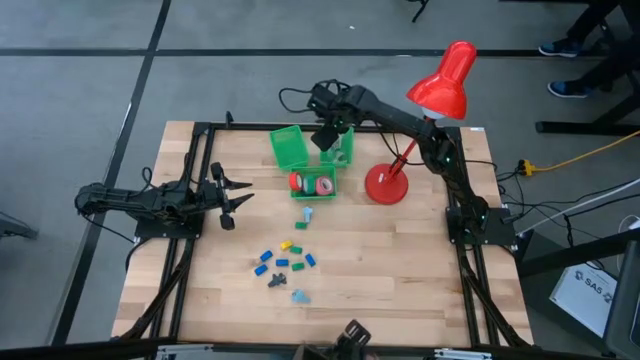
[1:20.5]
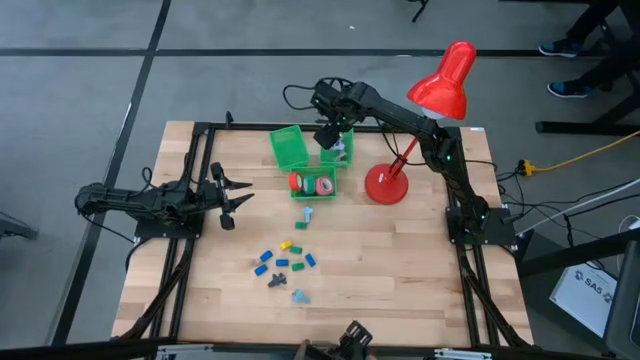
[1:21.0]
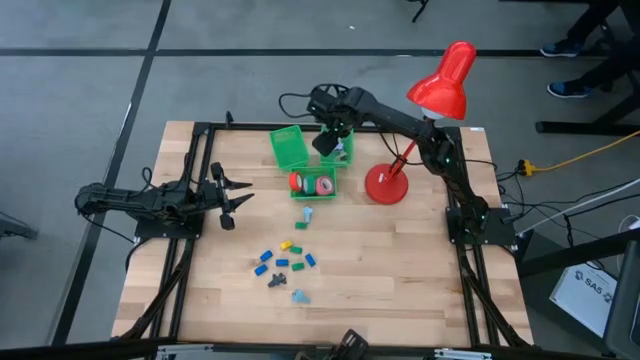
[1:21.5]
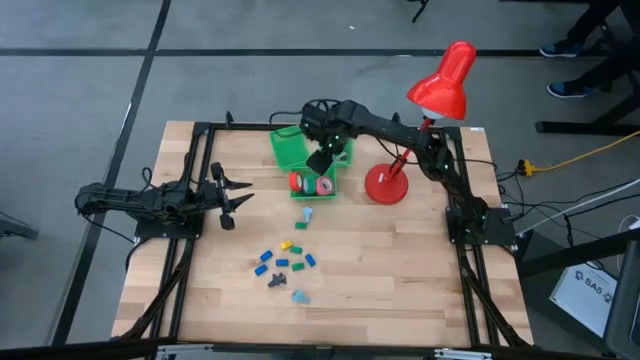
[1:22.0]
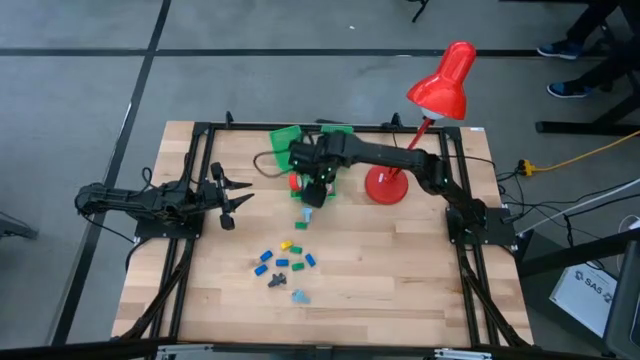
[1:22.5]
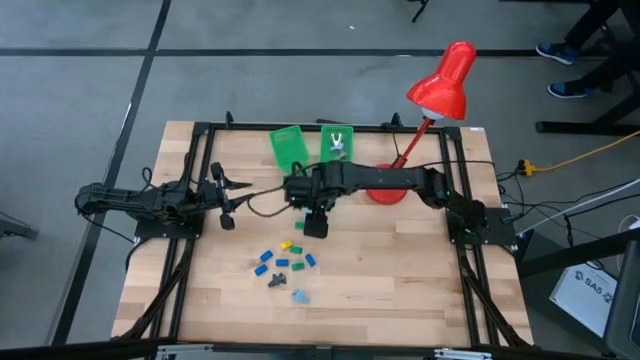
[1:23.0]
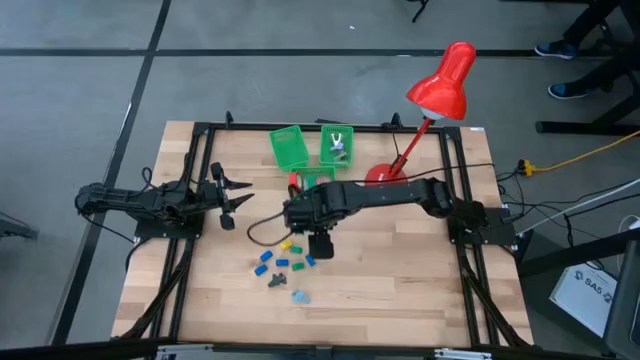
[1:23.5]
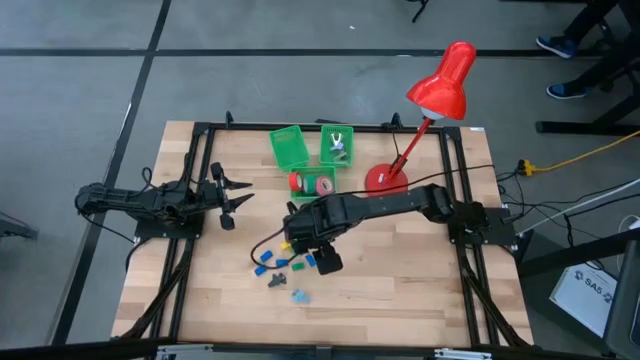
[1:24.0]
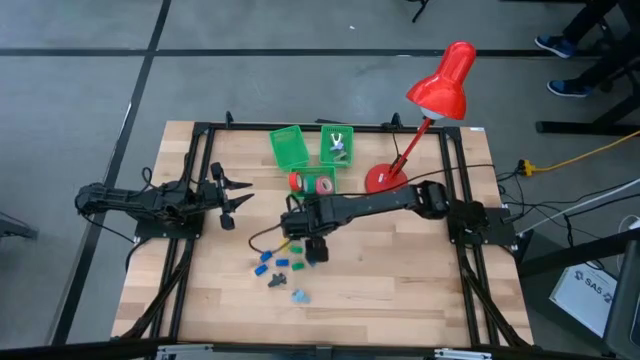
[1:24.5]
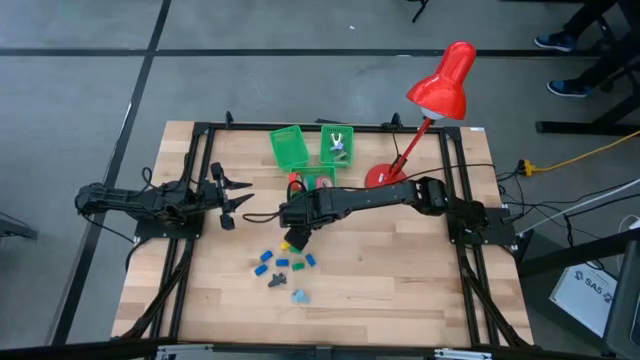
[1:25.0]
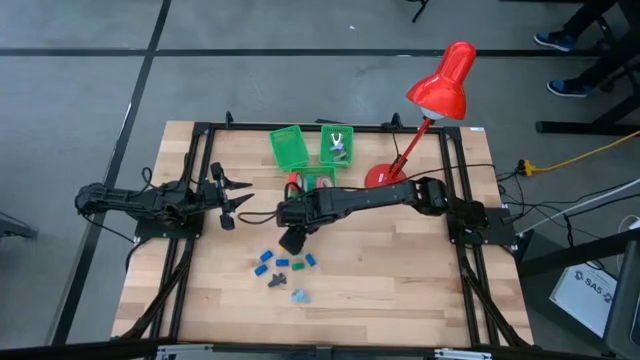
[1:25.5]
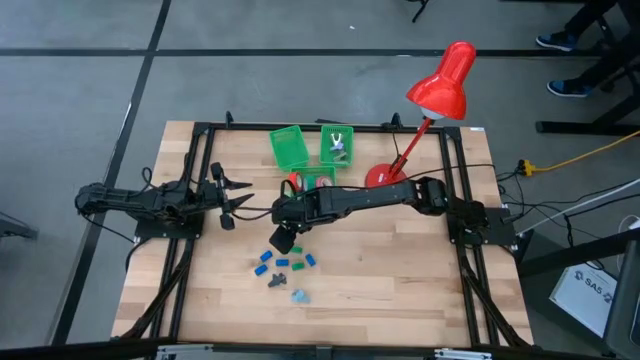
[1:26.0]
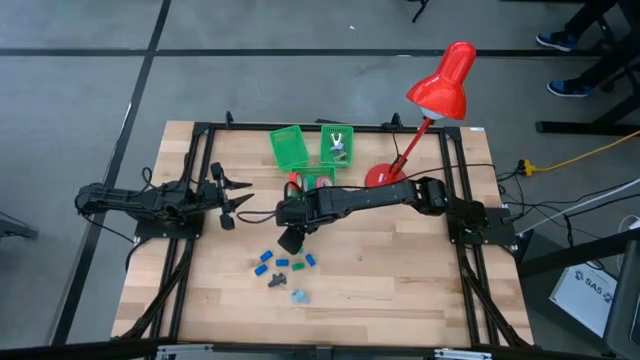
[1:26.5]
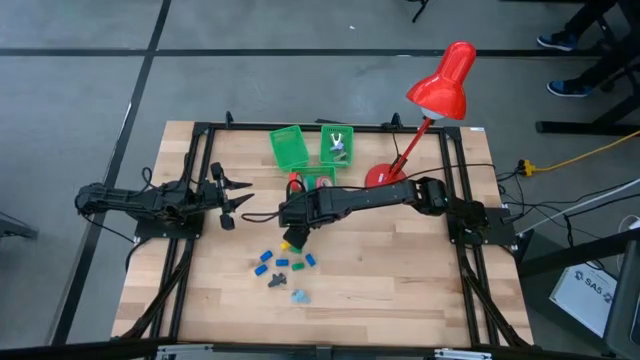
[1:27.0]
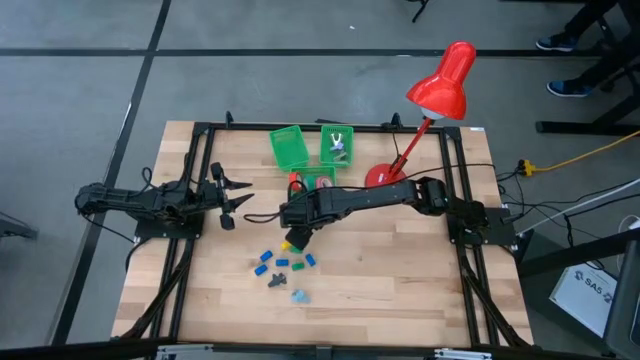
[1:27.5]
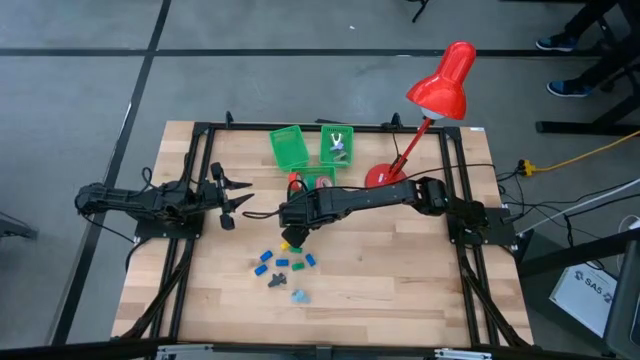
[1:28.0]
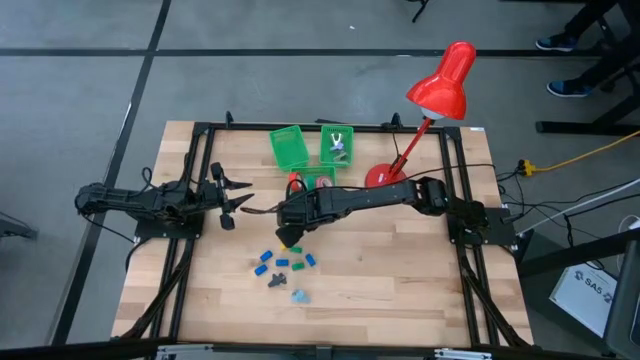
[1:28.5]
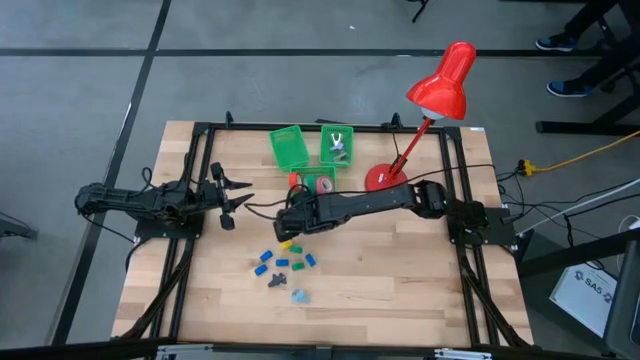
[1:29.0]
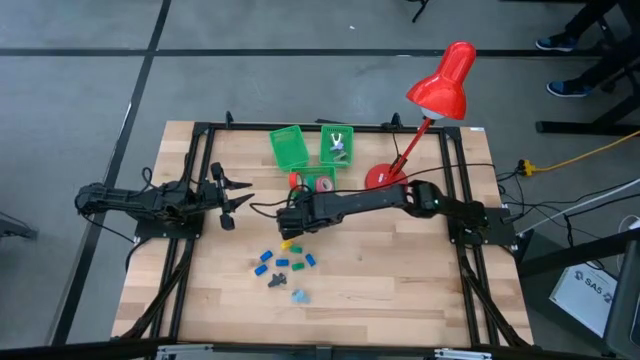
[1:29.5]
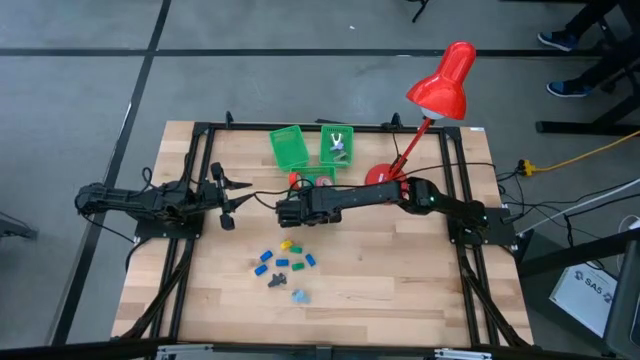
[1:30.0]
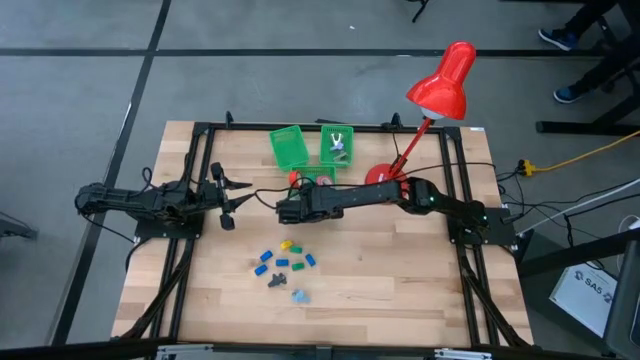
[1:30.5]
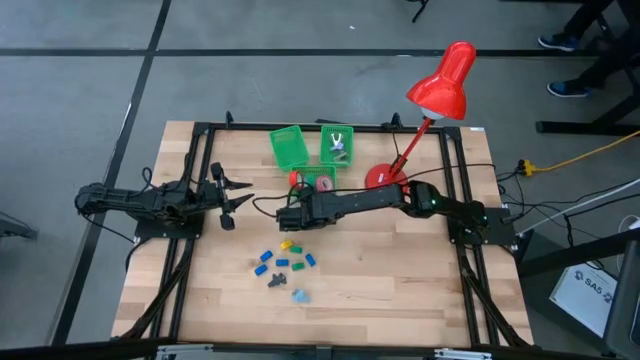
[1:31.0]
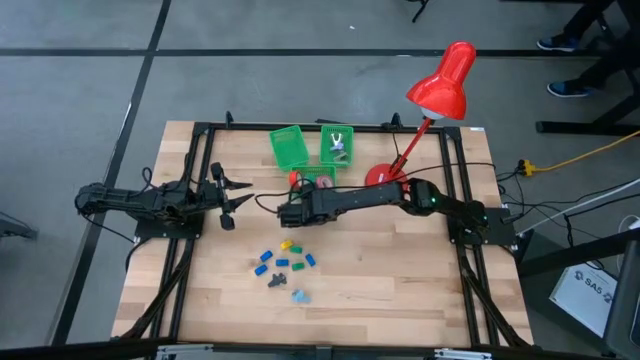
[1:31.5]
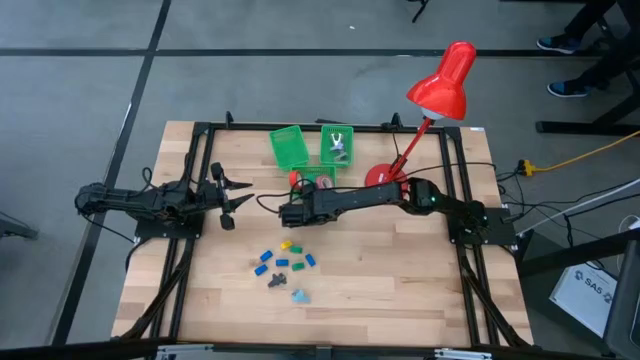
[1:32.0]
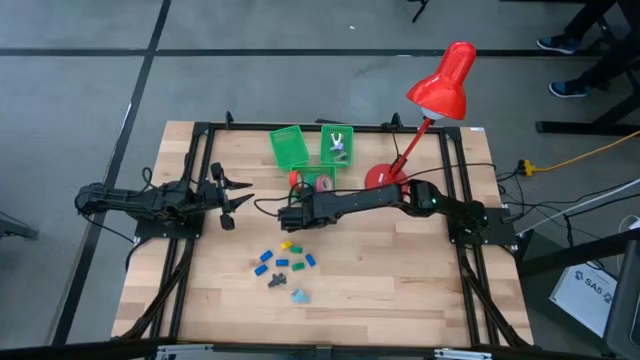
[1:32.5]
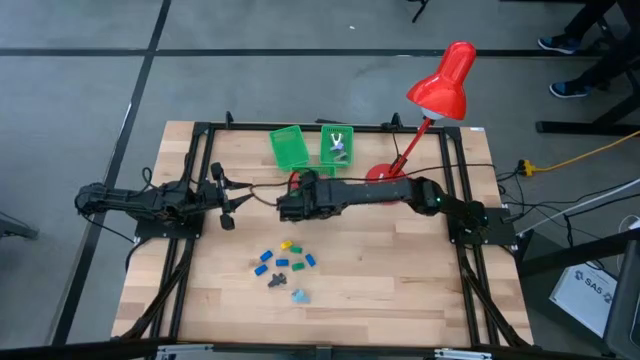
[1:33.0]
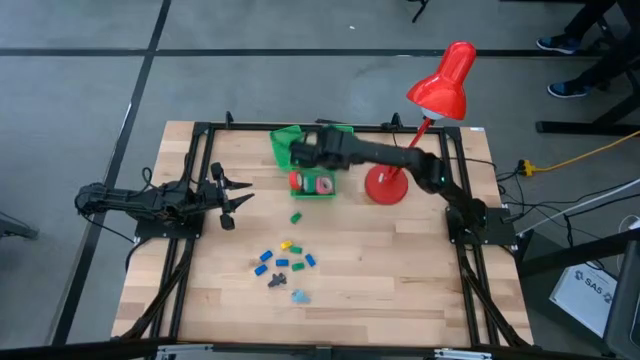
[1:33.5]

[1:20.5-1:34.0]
Task: Pick and place Stapler, Stapler remover, tape
Put the blue staple remover into the right green bin

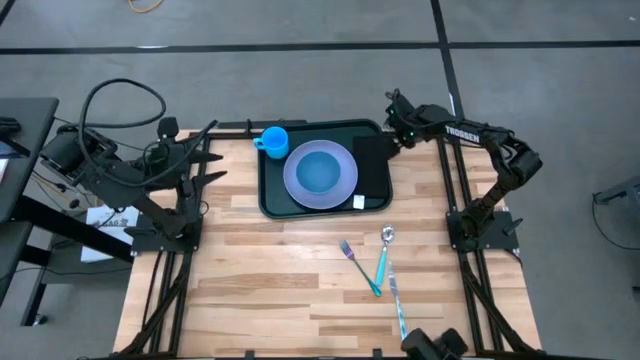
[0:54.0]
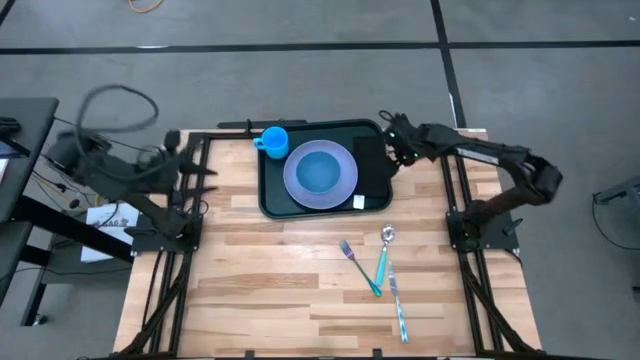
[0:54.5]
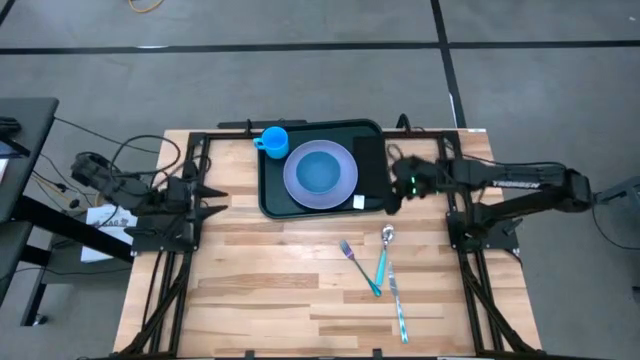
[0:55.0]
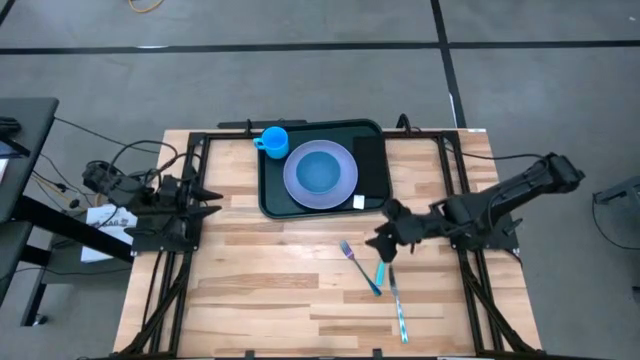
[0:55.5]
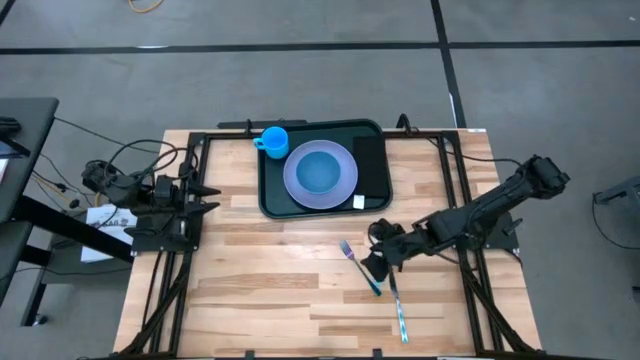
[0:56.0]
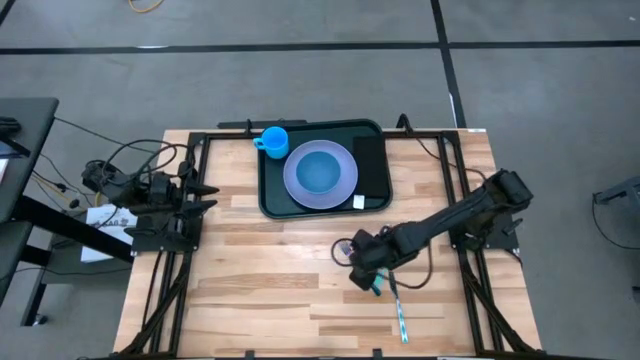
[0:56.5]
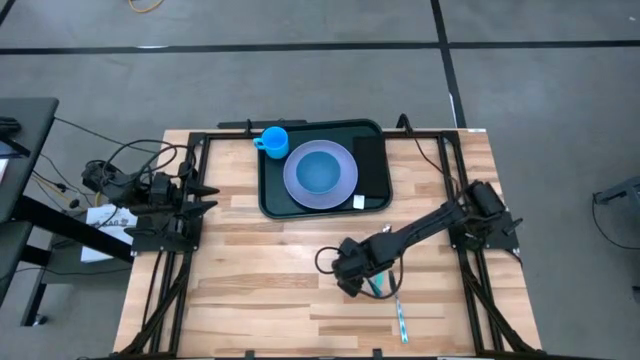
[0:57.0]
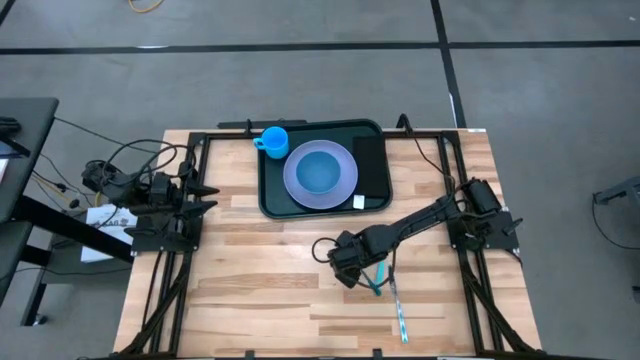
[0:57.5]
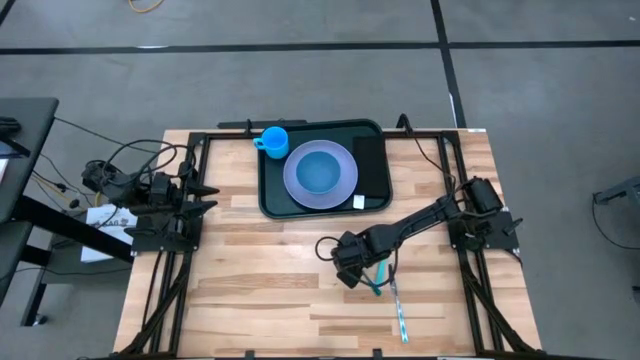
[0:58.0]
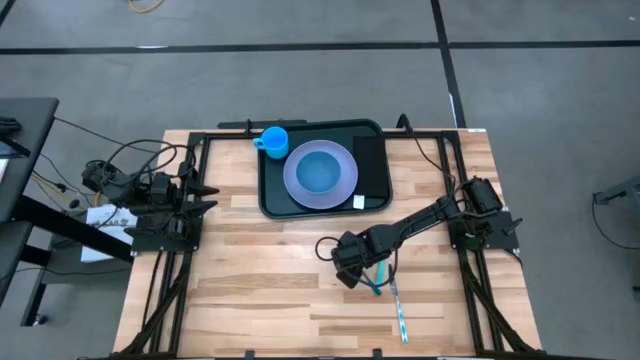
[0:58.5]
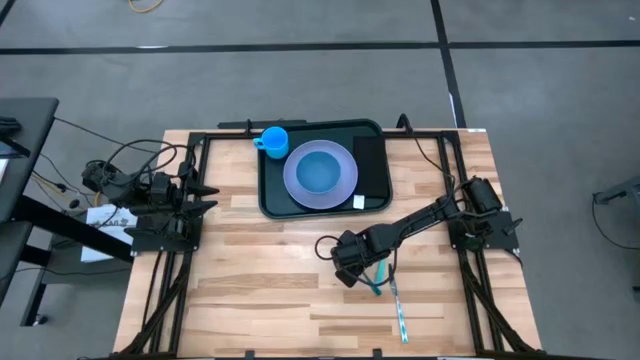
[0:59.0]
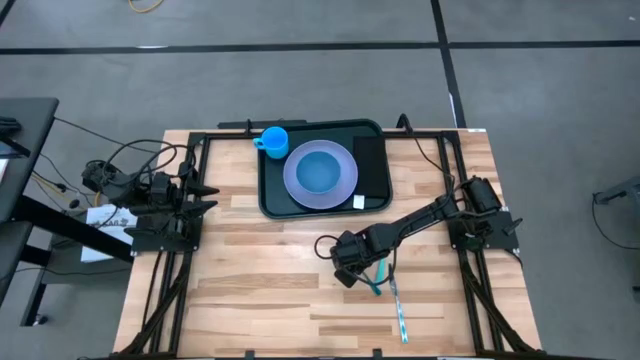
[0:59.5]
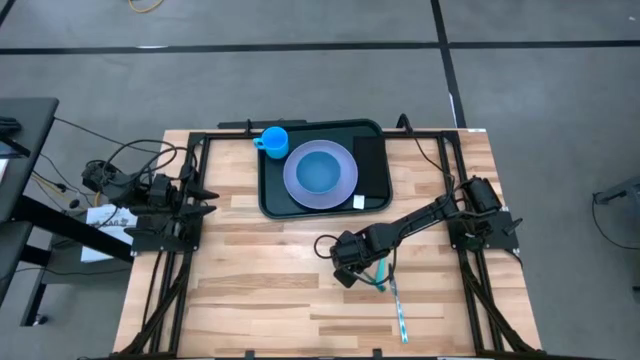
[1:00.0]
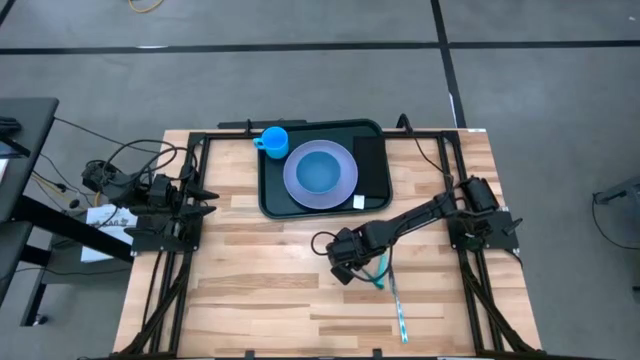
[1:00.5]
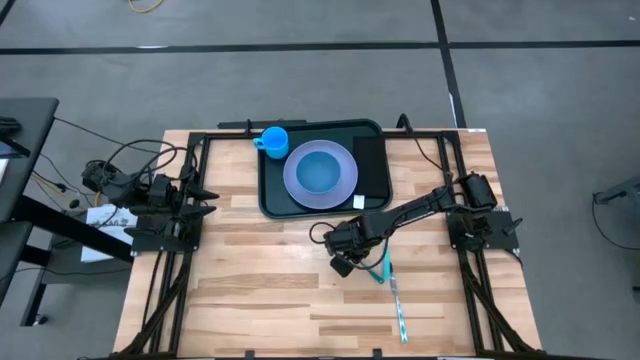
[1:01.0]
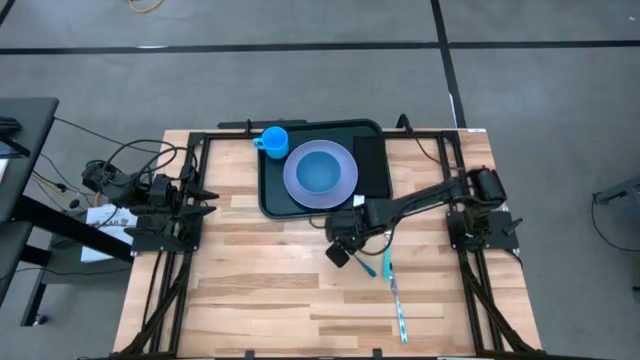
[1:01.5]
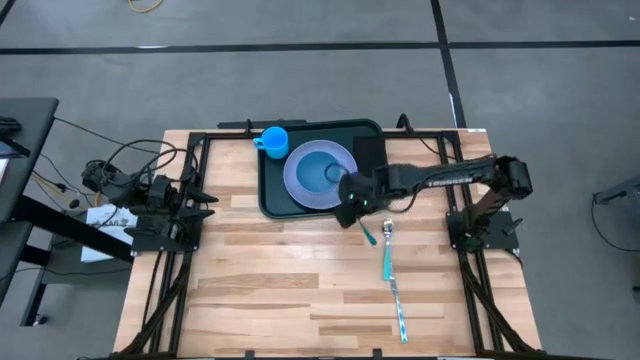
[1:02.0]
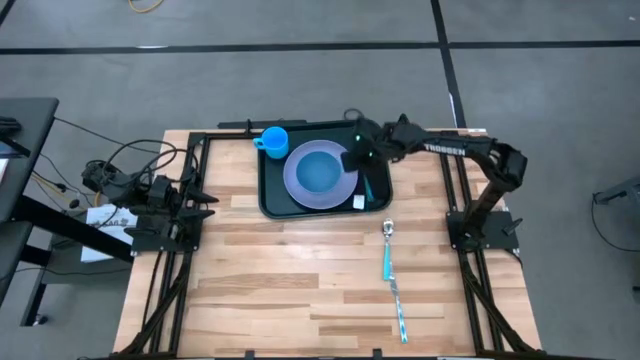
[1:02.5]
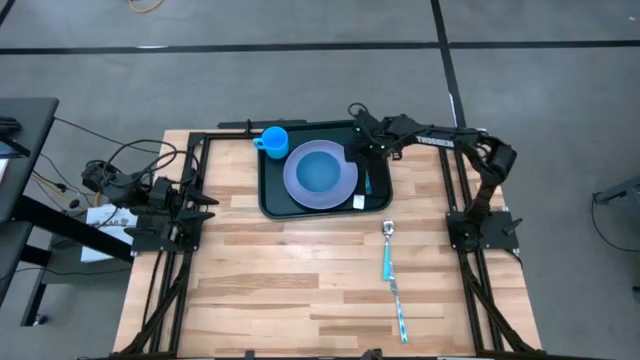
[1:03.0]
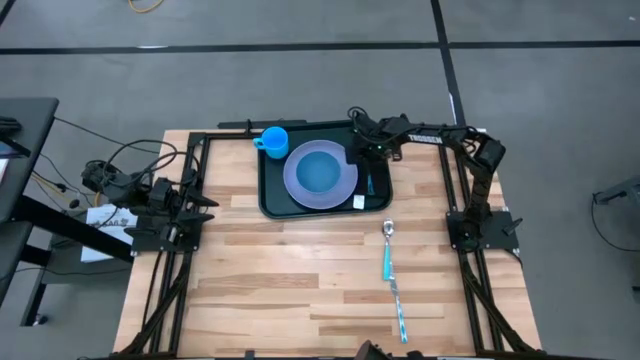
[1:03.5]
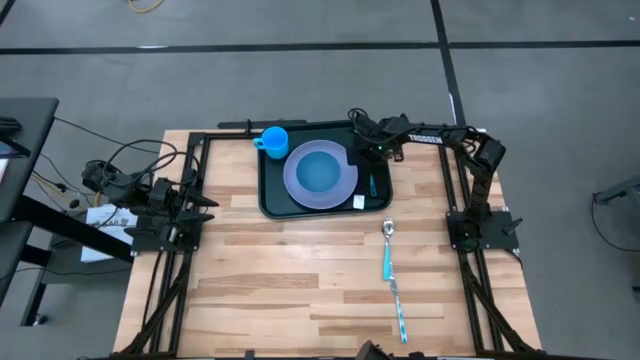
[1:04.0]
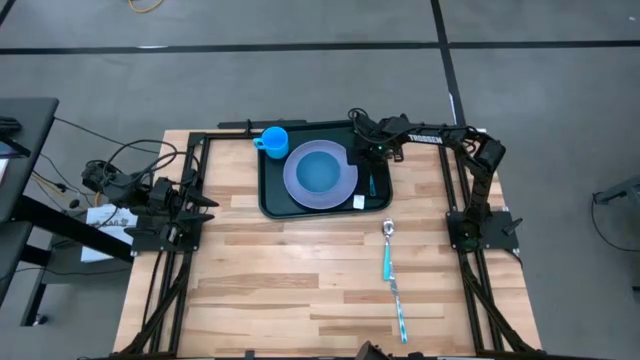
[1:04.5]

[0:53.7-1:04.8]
Task: Set up tray
Put the blue fork on the black napkin on the black tray
